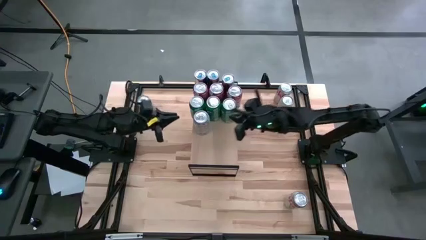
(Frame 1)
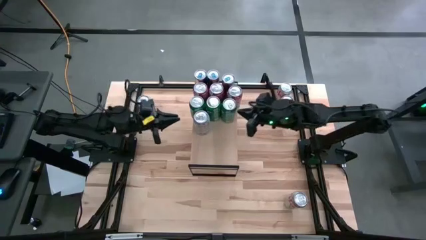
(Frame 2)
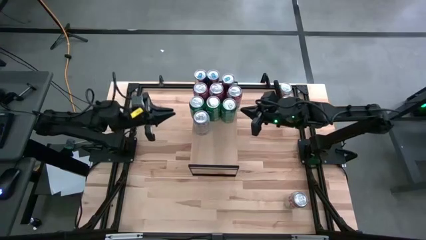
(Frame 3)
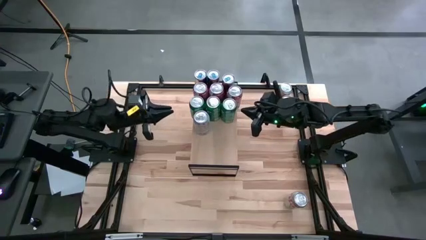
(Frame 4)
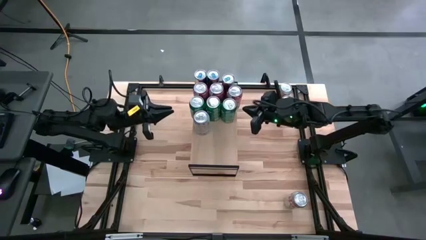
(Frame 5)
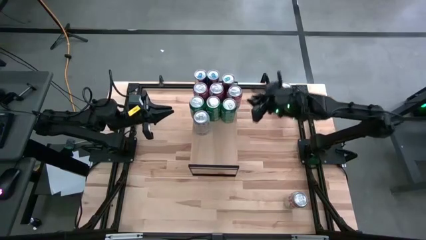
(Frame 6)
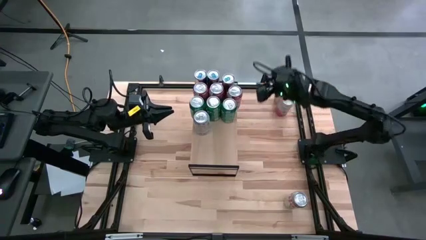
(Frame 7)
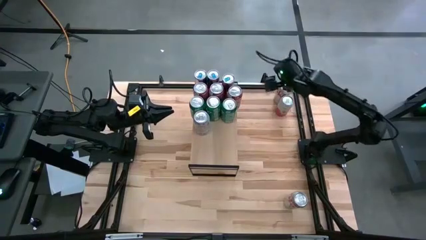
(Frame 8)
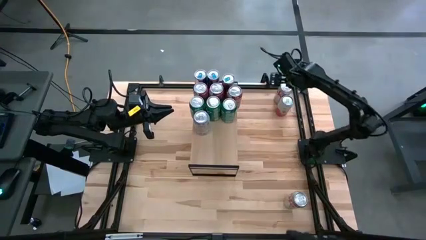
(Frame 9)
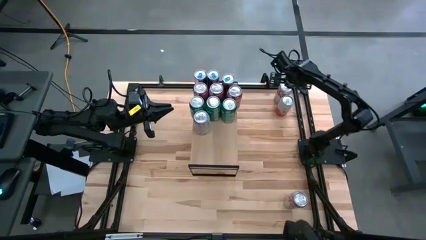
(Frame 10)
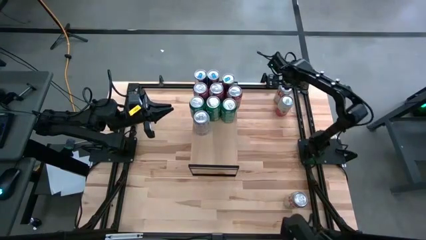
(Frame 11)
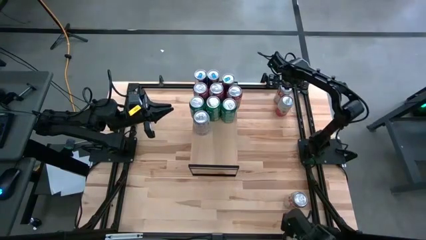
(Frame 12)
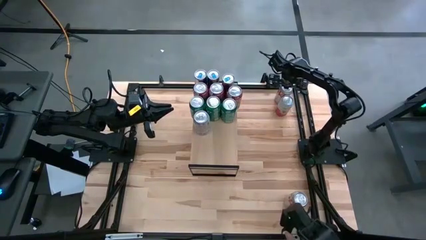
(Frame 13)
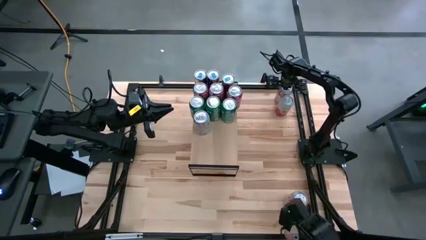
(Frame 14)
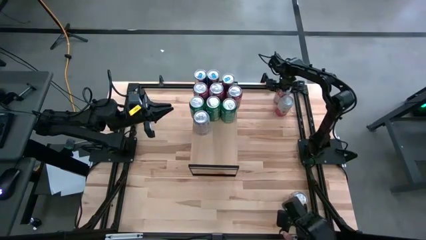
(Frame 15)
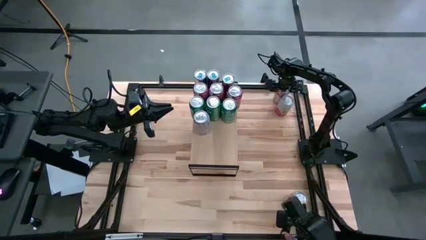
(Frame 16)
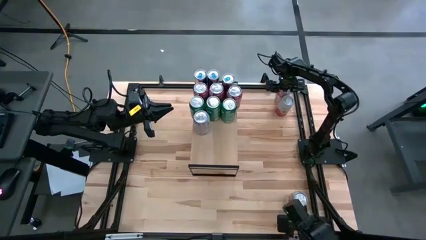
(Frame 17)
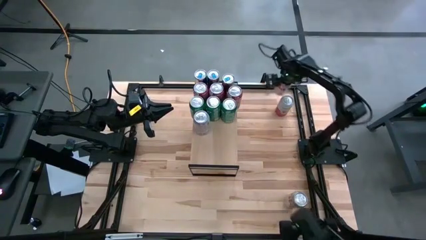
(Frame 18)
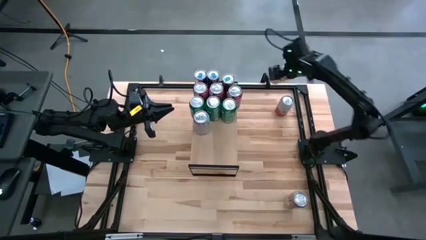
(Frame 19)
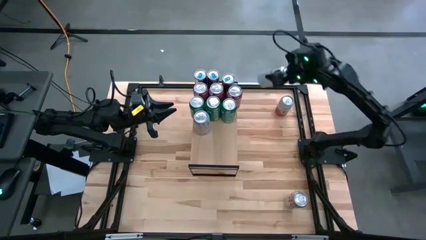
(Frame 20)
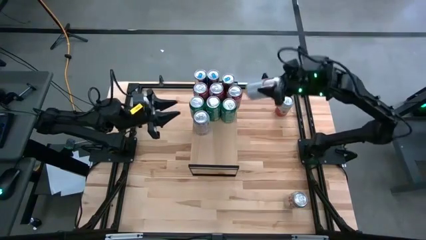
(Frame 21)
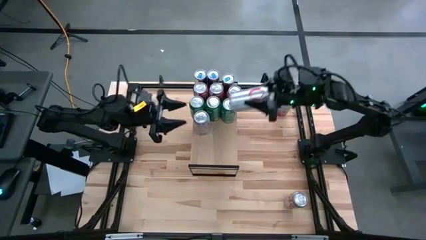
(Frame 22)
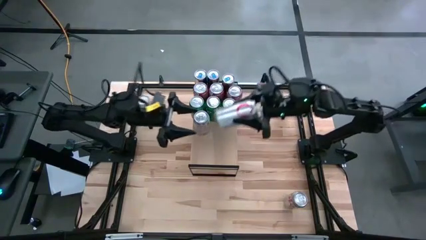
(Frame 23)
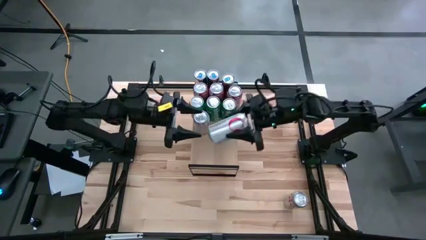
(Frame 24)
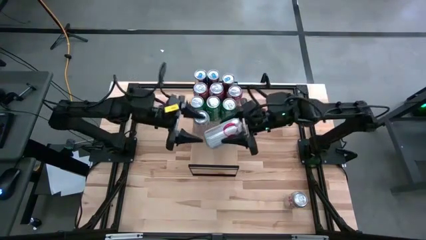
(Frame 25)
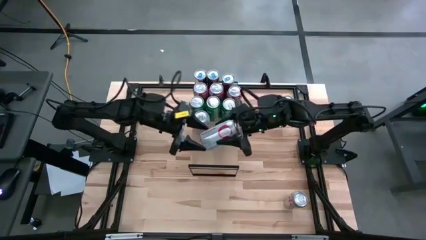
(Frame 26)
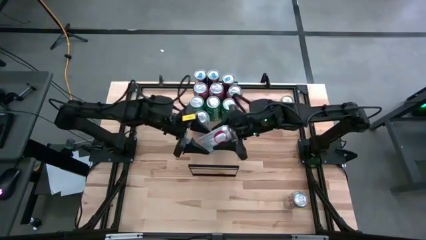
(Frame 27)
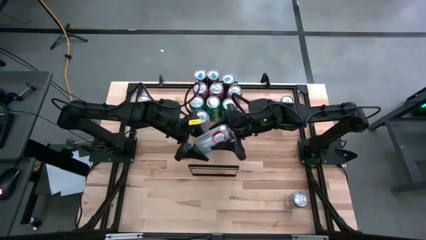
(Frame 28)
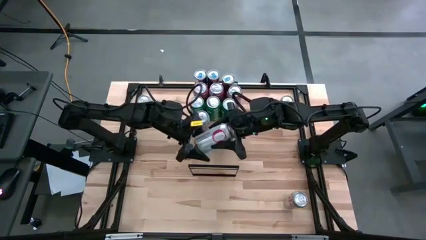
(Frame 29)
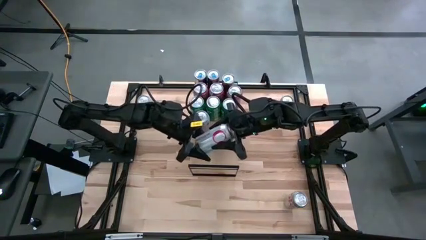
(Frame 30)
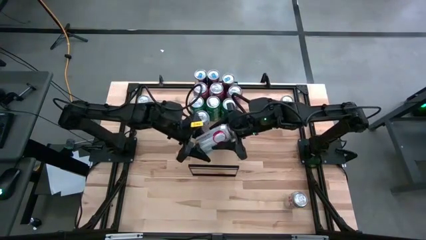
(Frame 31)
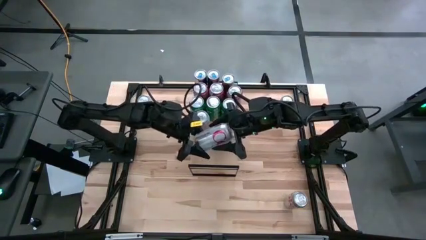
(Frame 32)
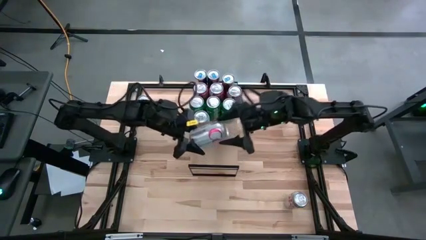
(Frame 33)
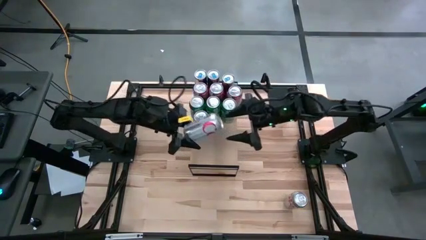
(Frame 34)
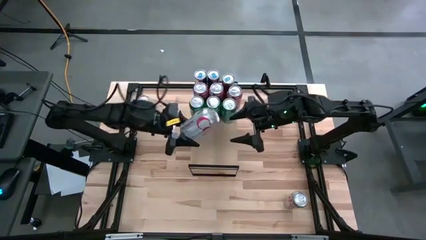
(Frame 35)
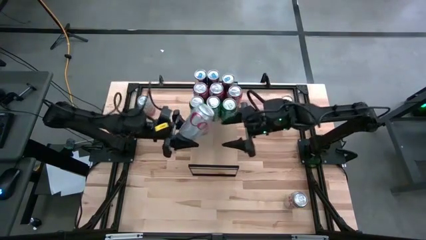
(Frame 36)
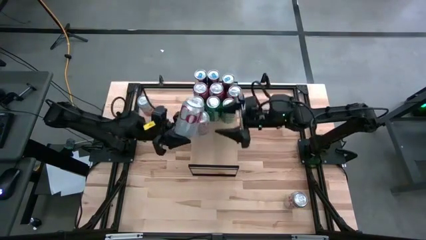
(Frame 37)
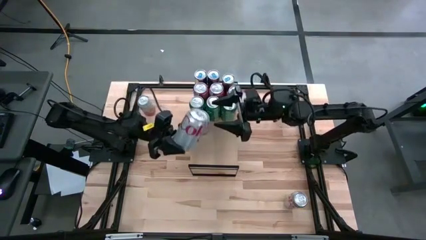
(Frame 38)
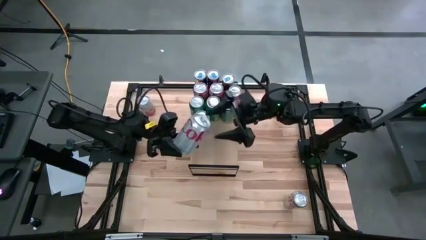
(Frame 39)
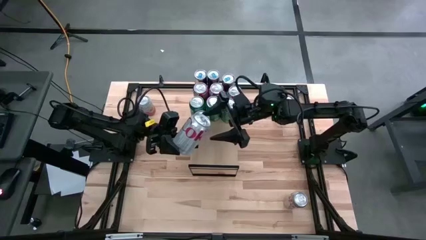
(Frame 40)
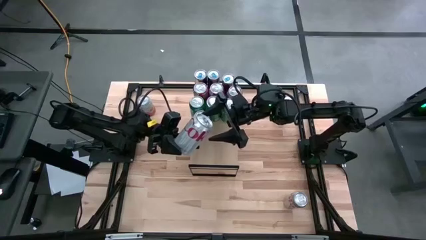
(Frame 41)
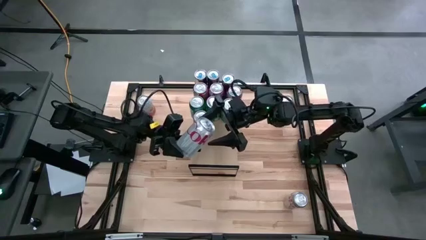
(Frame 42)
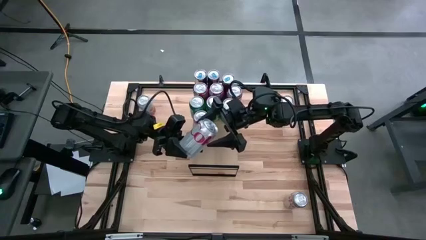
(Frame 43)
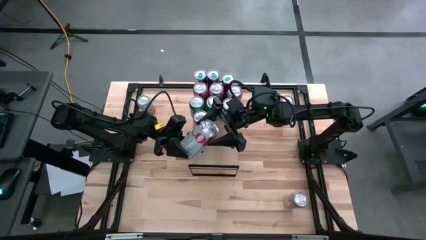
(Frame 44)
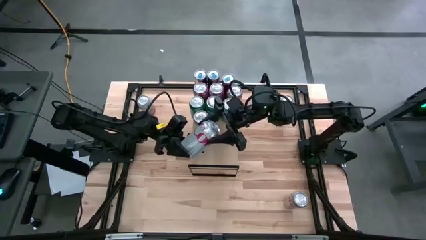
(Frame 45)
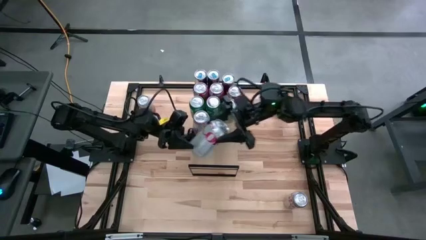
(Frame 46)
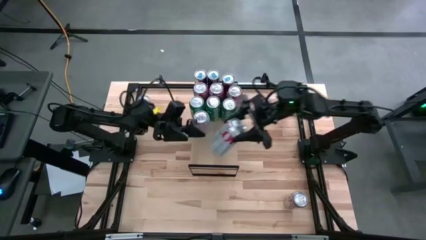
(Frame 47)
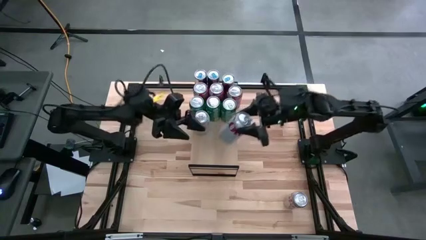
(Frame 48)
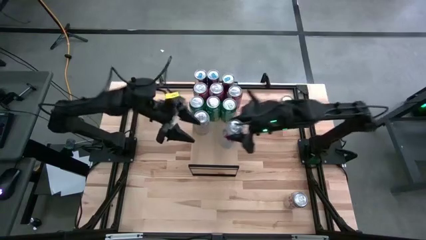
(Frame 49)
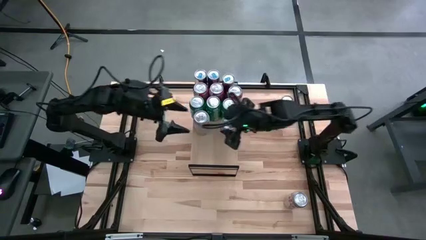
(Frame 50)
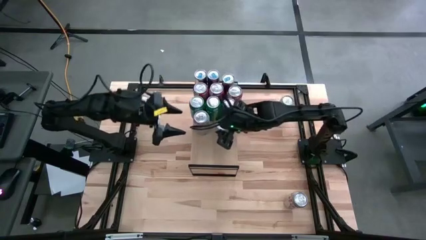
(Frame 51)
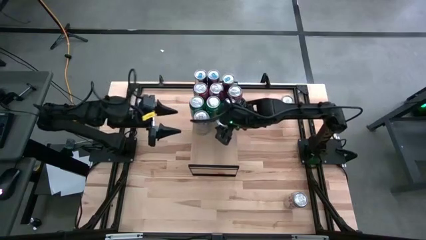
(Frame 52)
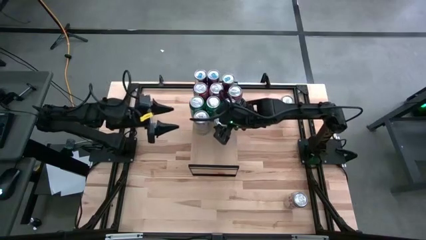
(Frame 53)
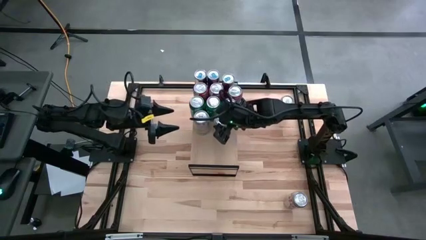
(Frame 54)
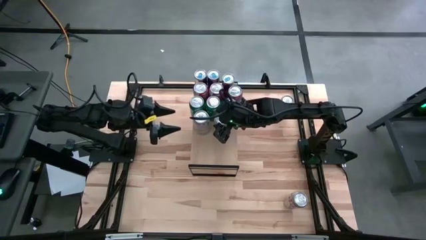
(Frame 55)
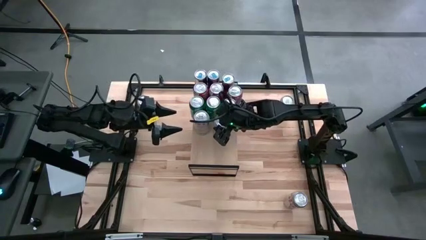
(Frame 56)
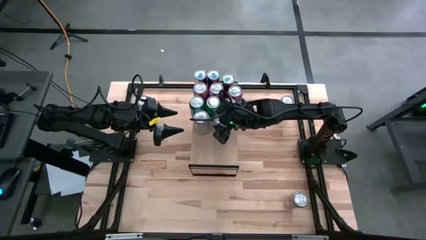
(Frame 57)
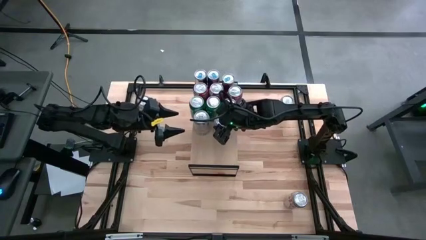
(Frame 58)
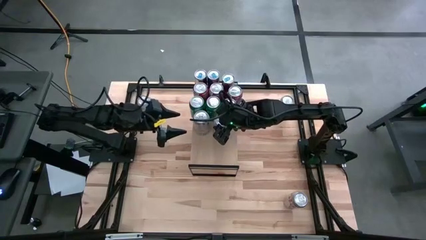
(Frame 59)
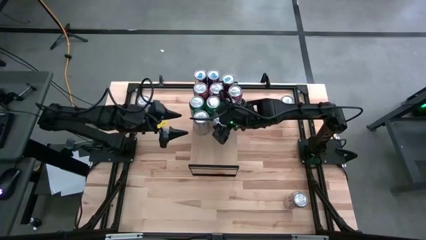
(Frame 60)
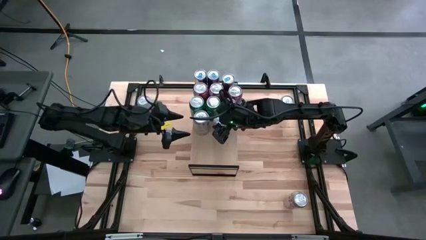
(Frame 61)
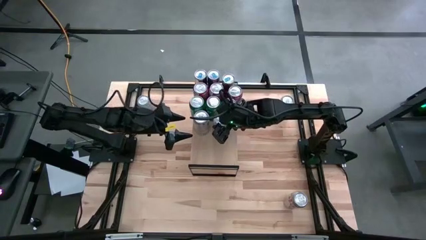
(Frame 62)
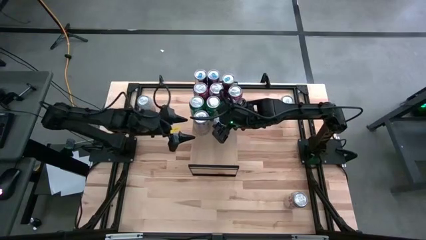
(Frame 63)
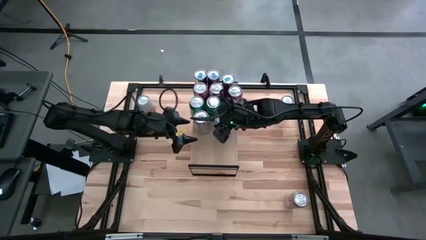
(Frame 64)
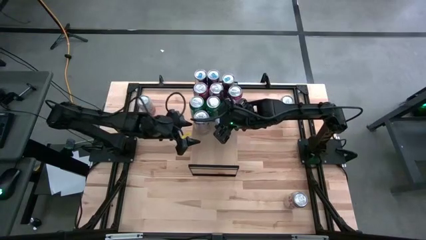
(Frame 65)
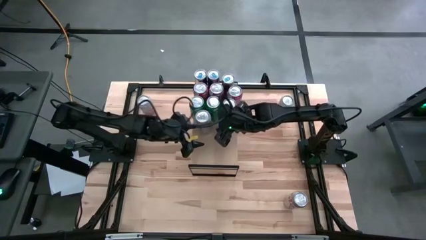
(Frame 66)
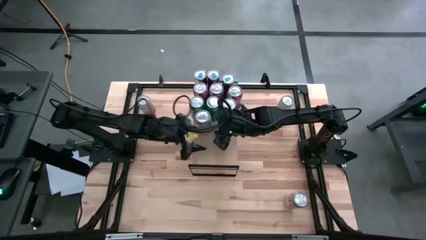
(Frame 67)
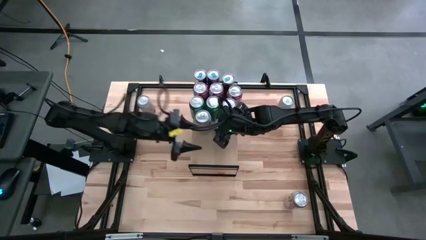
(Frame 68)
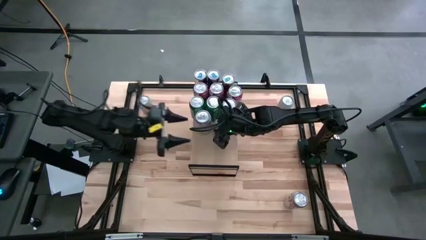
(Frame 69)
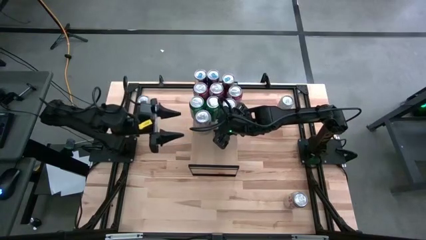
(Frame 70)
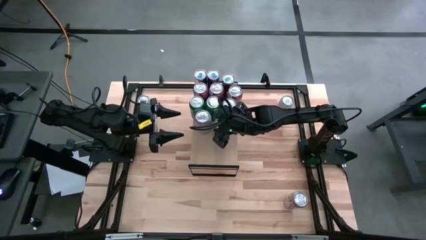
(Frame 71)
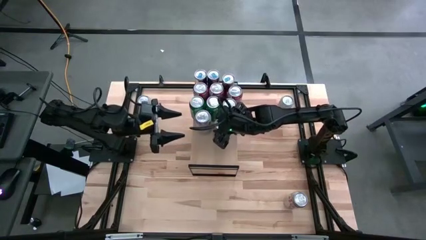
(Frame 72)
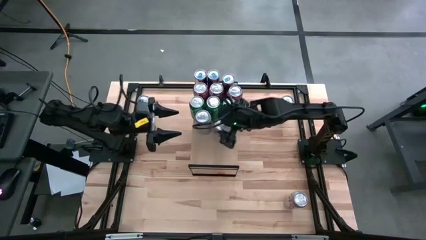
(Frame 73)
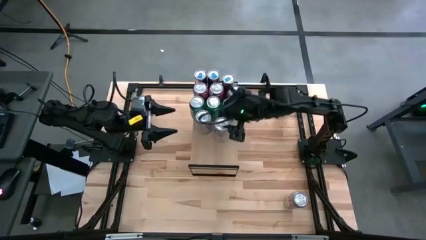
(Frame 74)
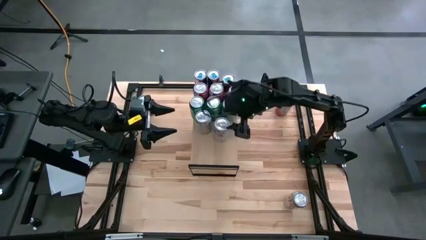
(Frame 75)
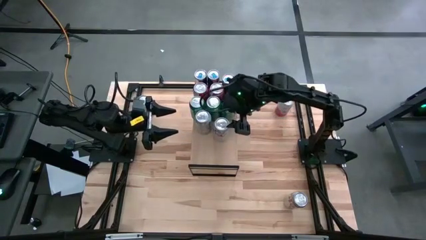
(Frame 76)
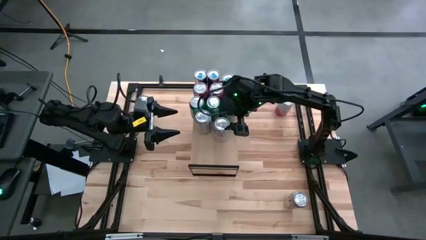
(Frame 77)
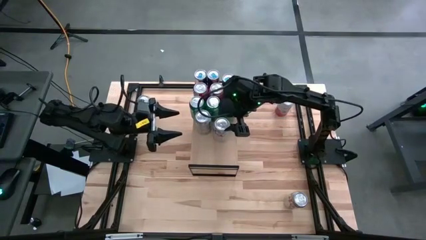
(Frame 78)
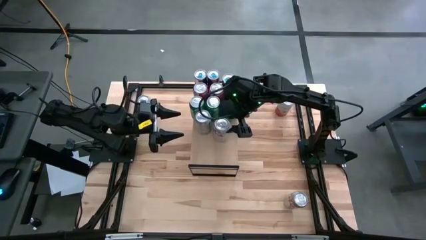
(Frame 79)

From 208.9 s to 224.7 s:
Task: Place canned beverage on shelf
Put the top red silver soda on the shelf
